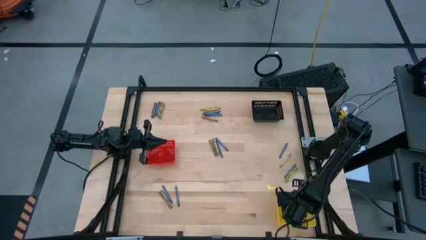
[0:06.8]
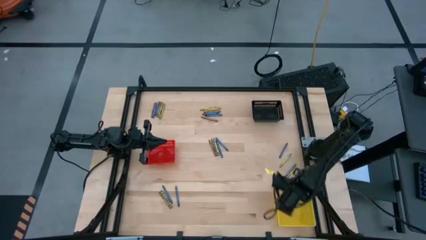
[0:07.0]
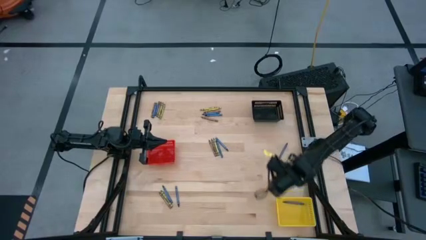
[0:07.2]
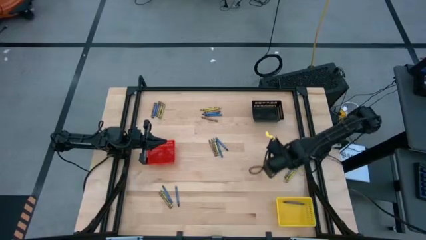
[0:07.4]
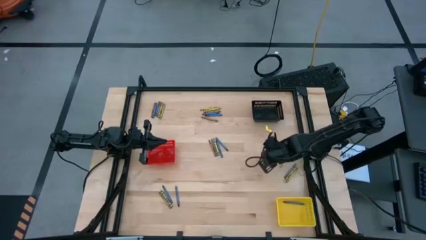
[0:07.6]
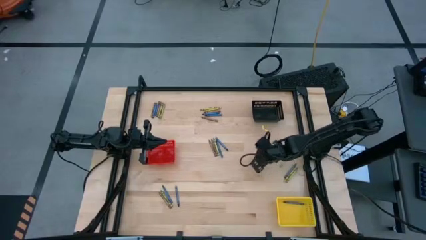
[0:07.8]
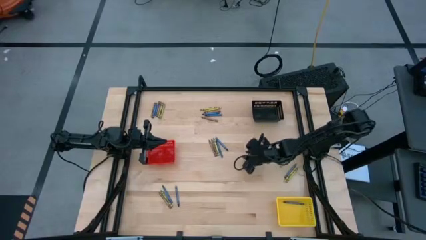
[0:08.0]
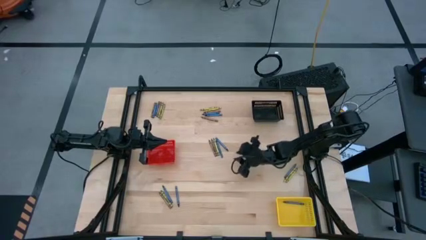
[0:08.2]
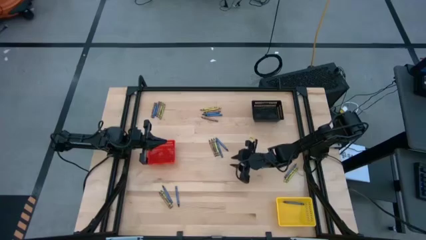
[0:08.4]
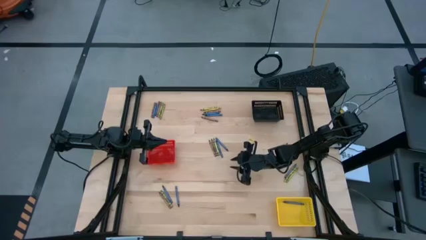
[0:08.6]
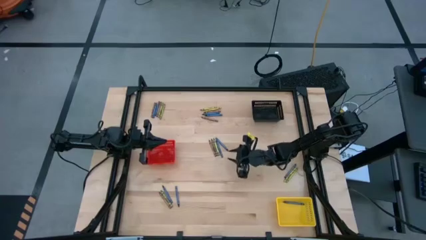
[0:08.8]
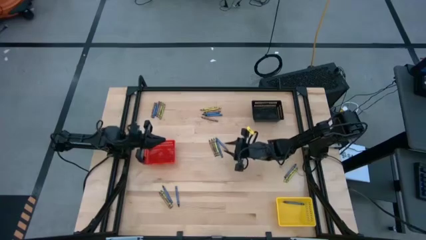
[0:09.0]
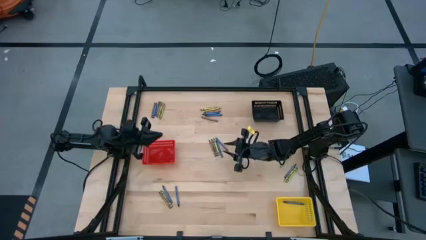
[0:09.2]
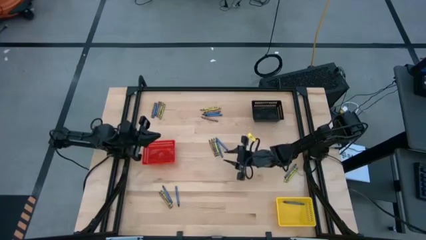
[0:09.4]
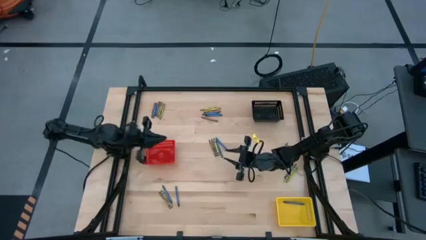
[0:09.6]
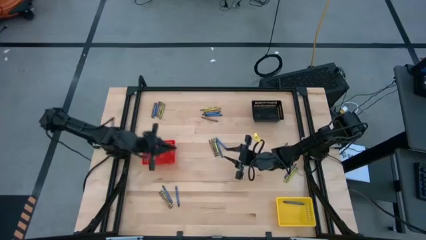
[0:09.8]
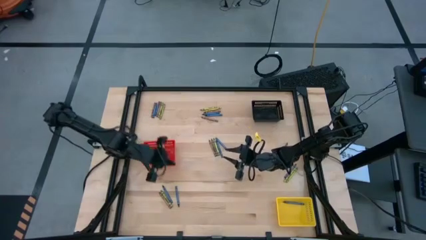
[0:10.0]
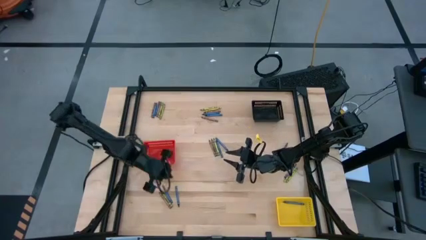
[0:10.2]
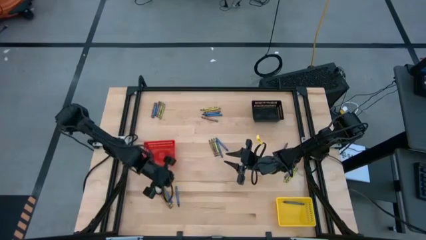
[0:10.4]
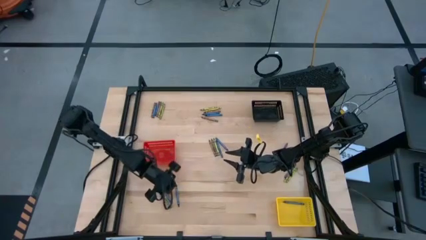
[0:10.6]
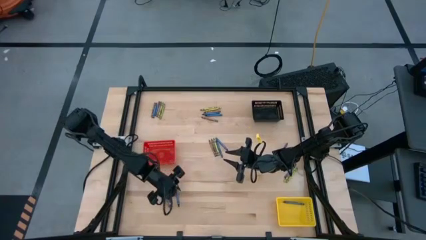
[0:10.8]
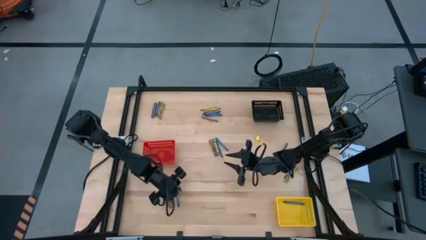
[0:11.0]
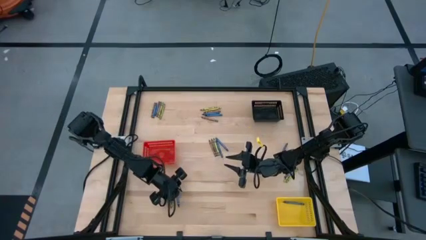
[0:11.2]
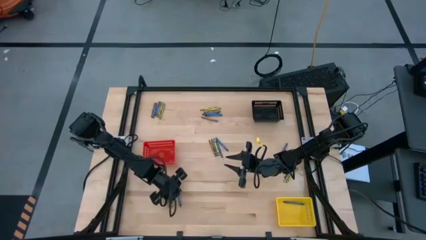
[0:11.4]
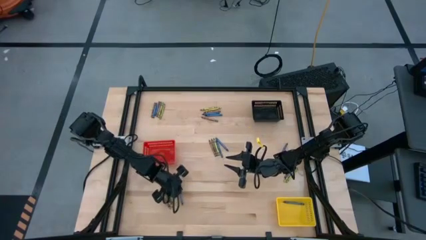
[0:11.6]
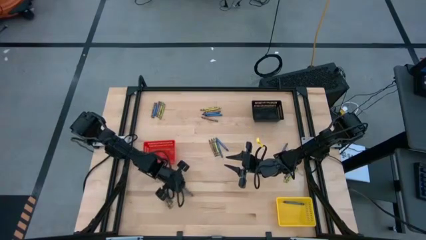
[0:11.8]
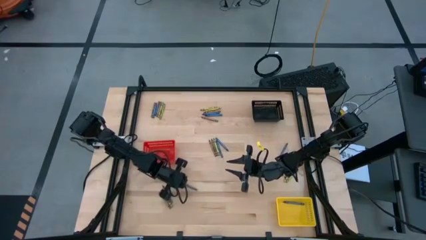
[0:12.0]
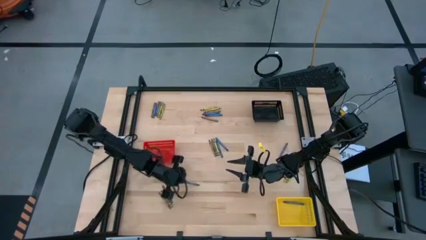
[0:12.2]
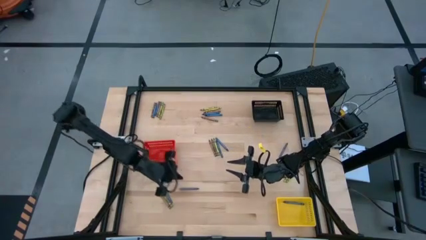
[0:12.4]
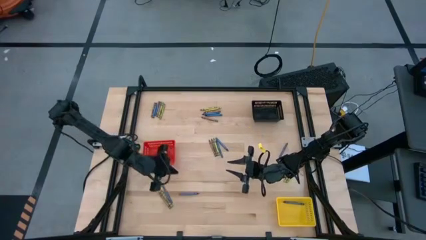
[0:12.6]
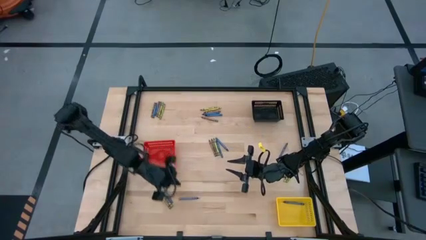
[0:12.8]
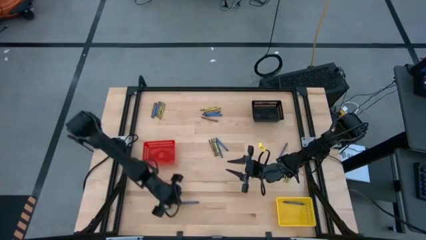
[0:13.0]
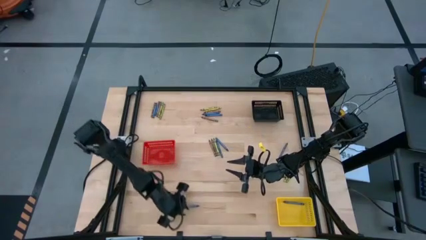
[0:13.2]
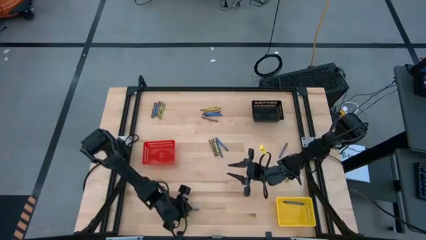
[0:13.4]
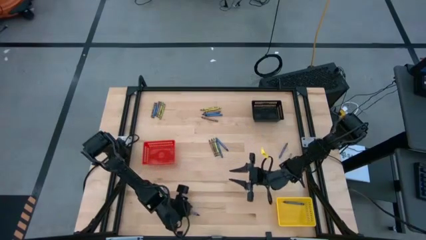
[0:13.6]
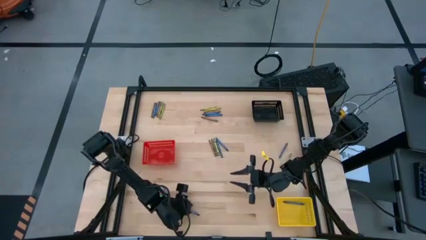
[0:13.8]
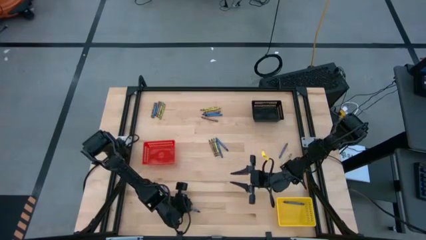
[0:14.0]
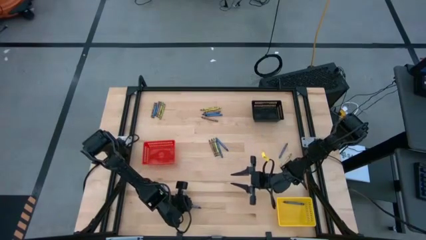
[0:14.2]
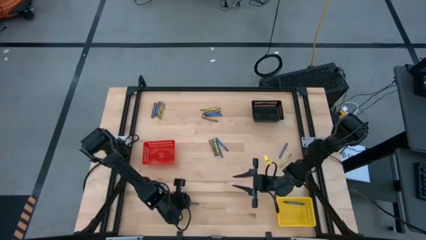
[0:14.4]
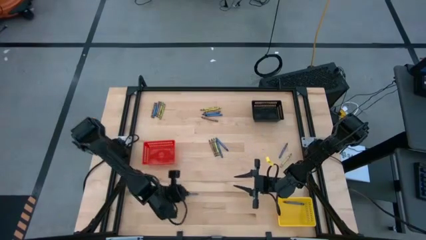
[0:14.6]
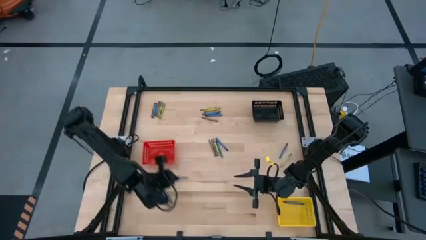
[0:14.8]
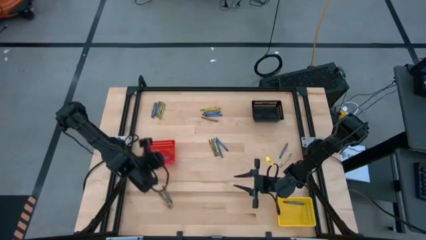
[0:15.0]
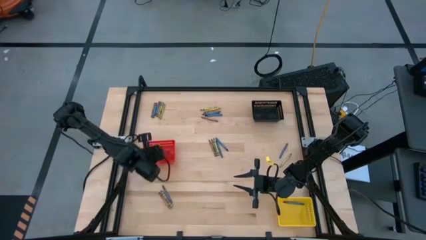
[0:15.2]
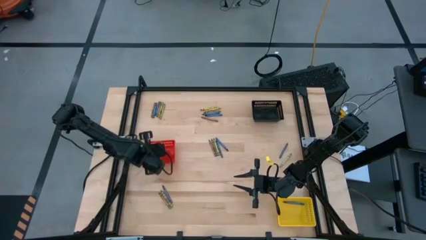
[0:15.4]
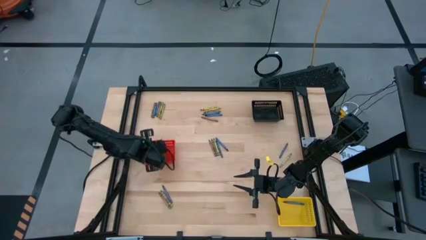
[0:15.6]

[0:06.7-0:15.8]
Task: Sort crayons
Put the blue crayon into the yellow bin

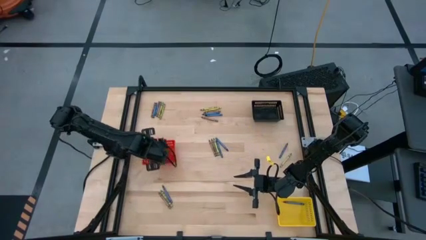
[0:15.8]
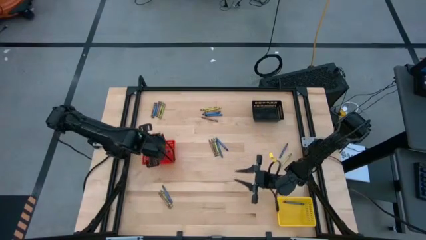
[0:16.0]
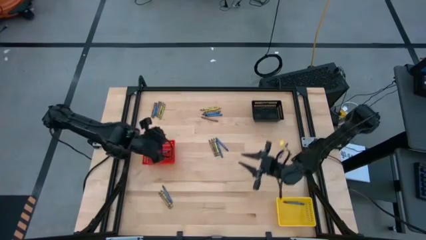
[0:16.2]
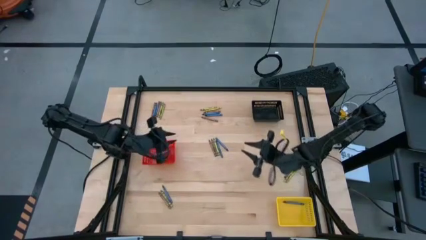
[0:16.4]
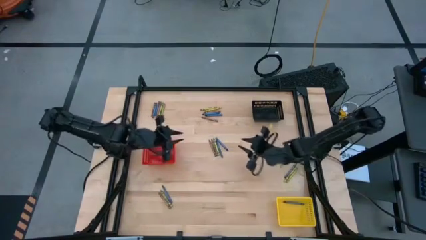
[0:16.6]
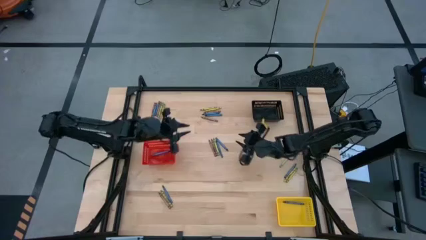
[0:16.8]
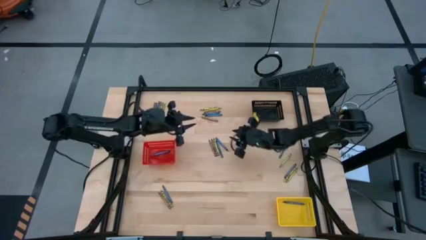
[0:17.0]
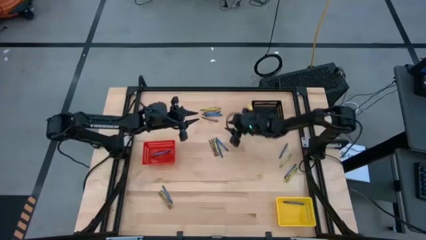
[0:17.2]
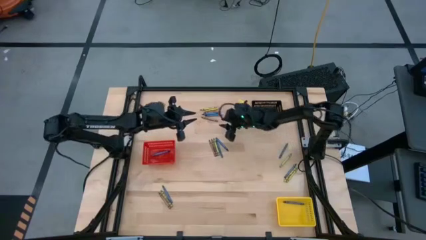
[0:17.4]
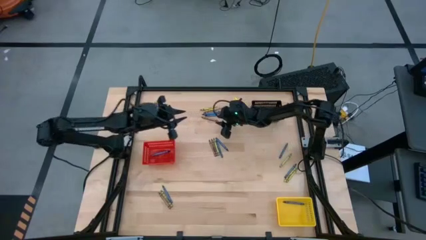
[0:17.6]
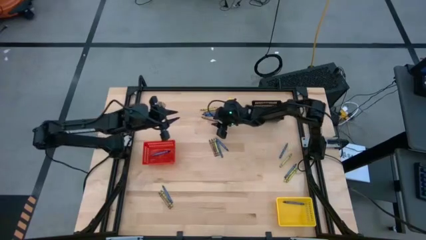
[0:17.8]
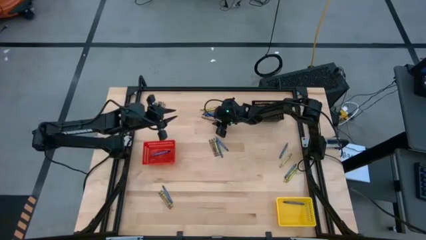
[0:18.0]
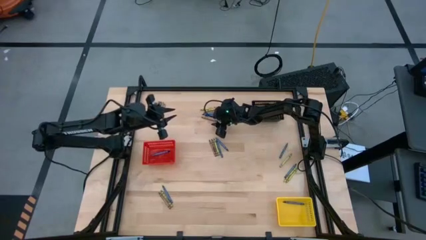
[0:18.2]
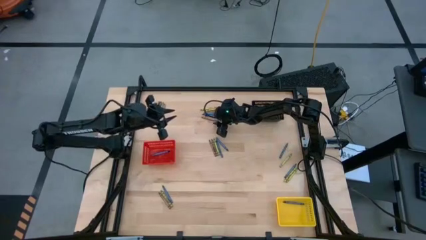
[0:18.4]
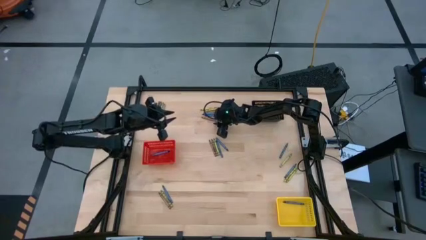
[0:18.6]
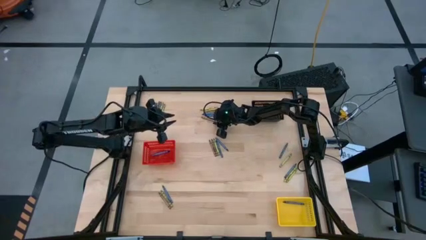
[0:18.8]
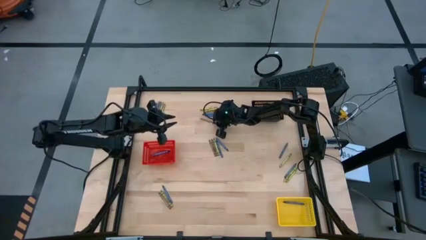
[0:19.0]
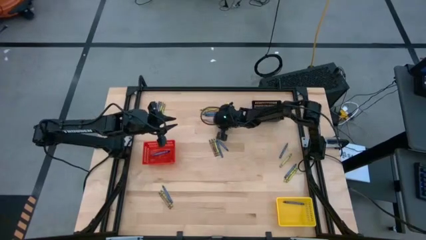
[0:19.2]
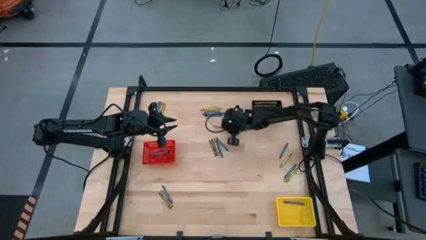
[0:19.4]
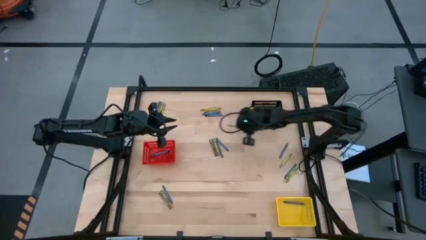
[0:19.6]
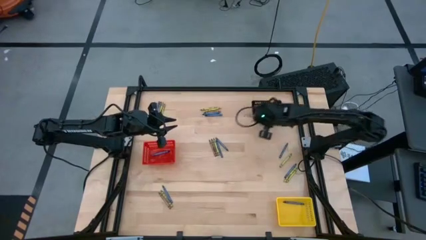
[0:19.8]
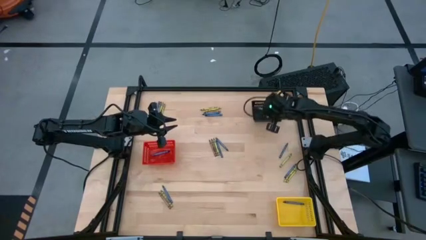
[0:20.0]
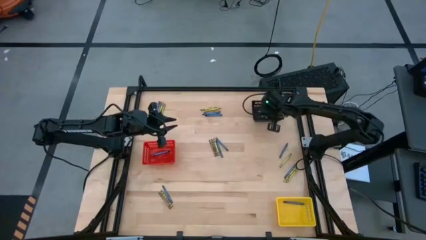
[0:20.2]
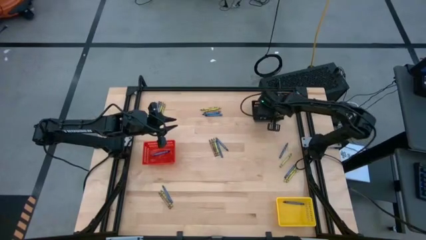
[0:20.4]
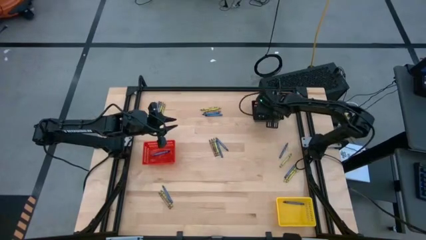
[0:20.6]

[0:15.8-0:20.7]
Put the brown crayon into the black bin

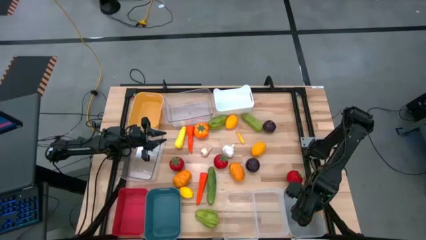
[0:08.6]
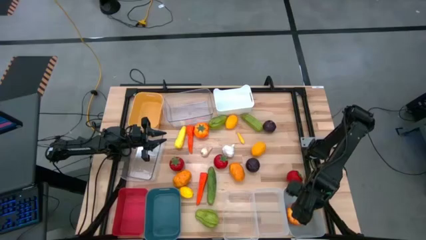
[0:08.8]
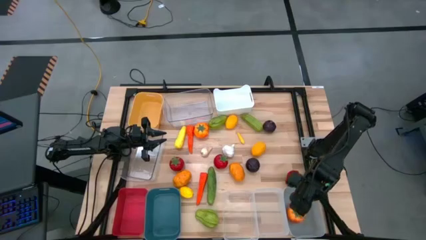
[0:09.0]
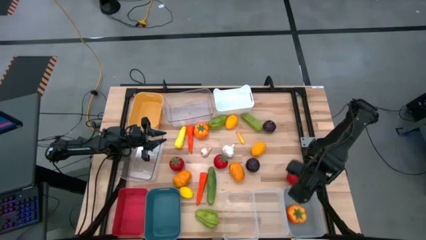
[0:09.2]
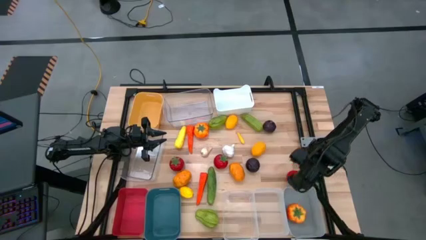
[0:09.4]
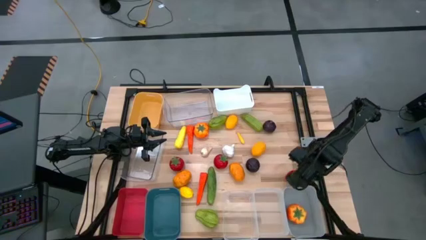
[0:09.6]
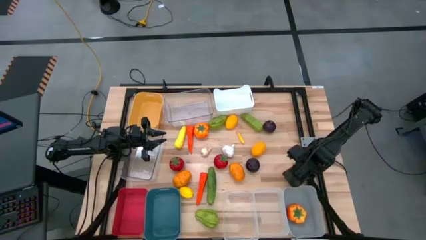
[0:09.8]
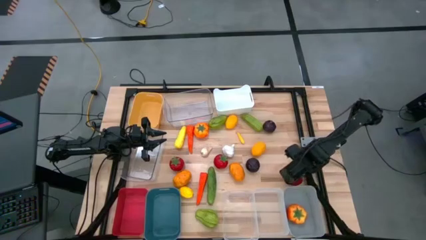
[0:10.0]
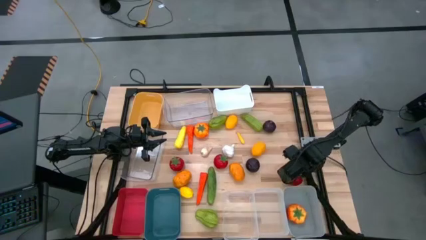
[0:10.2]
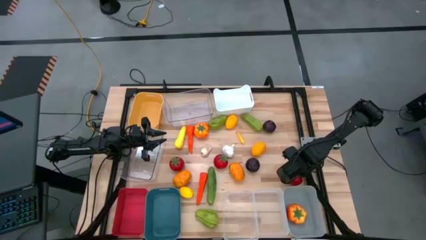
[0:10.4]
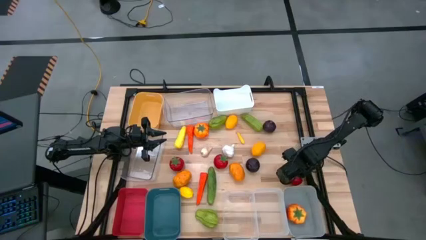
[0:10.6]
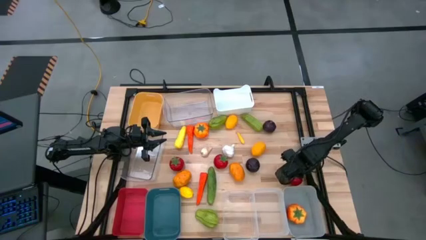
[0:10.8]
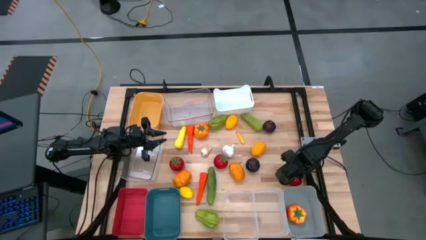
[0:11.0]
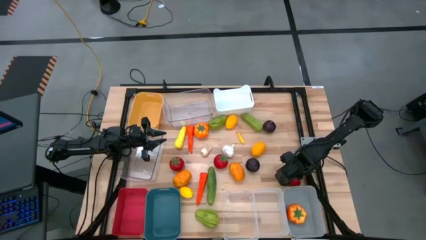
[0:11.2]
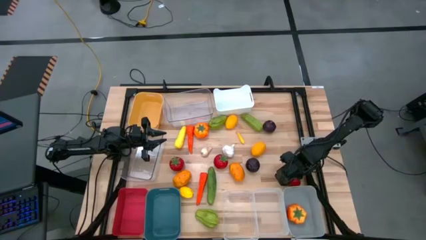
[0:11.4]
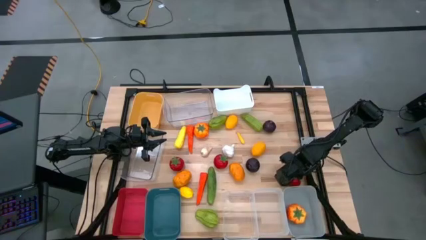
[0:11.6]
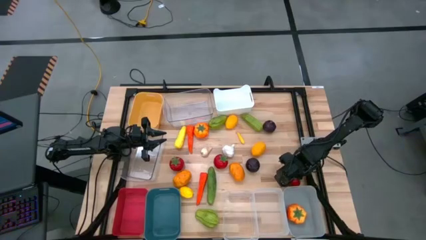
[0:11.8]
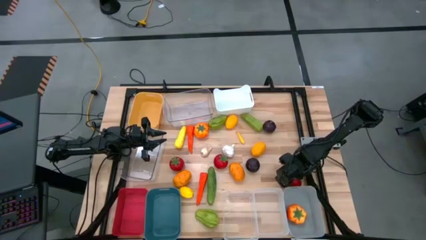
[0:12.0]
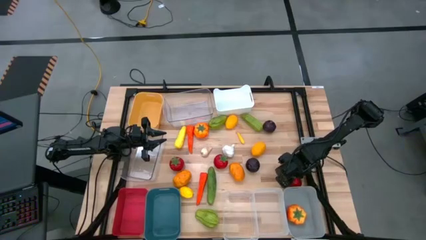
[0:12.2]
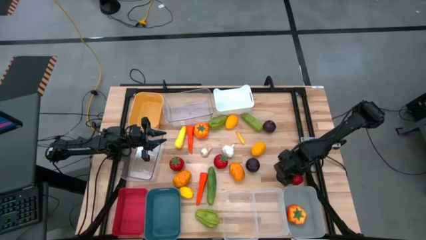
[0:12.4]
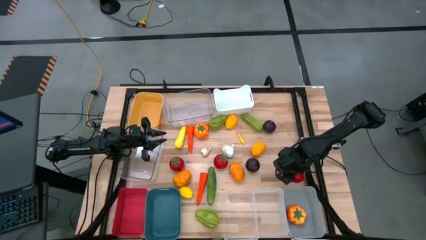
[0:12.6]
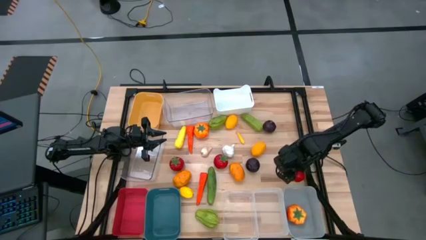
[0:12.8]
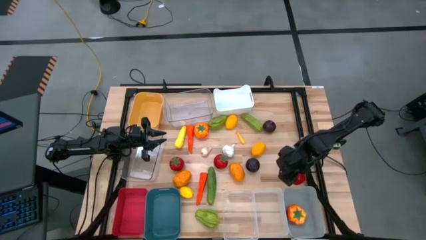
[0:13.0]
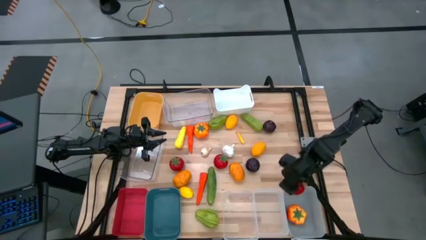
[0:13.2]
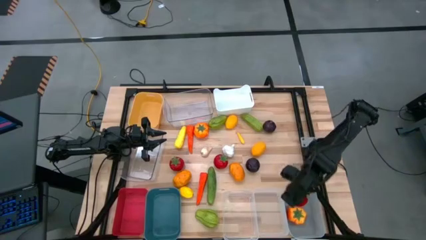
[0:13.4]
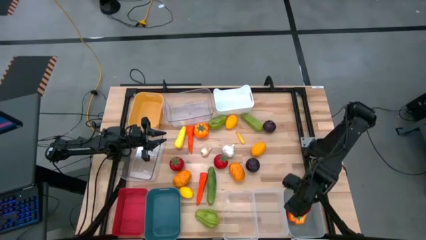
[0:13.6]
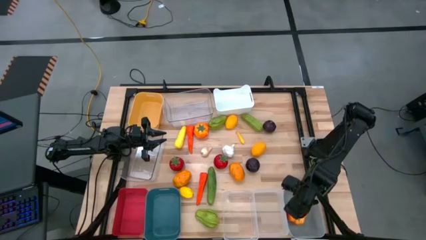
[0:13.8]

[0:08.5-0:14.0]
Task: Sort produce into baskets
Put the right red tomato into the gray bin
